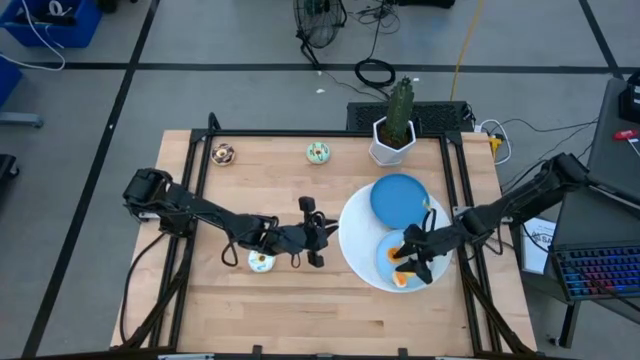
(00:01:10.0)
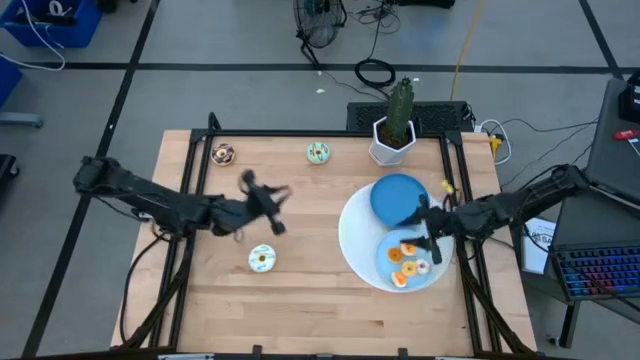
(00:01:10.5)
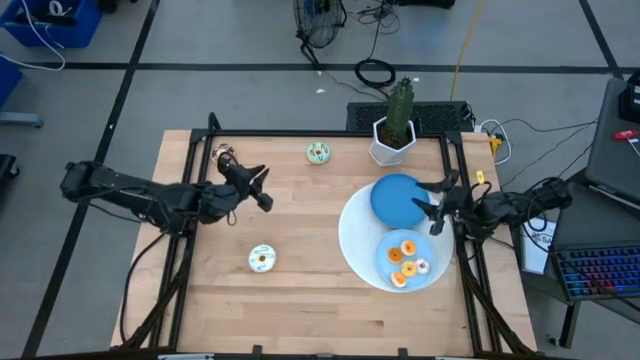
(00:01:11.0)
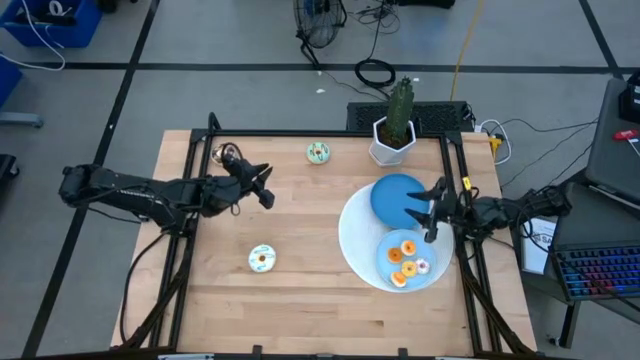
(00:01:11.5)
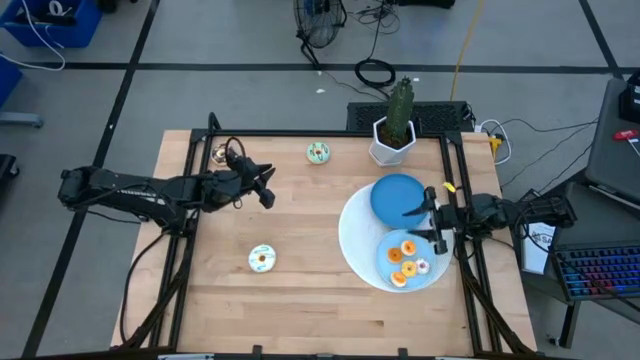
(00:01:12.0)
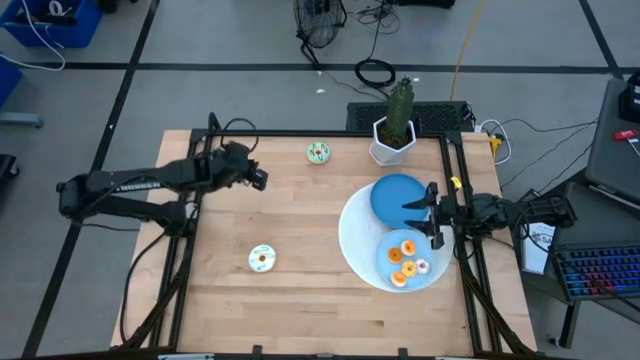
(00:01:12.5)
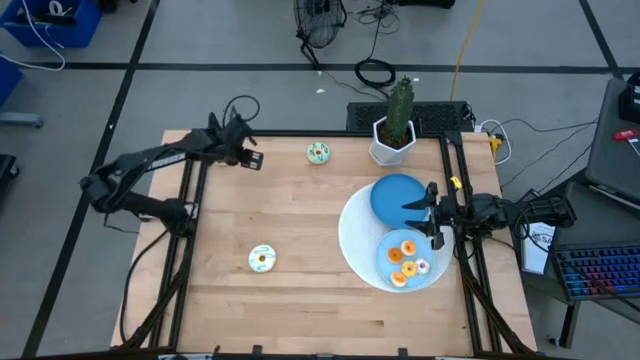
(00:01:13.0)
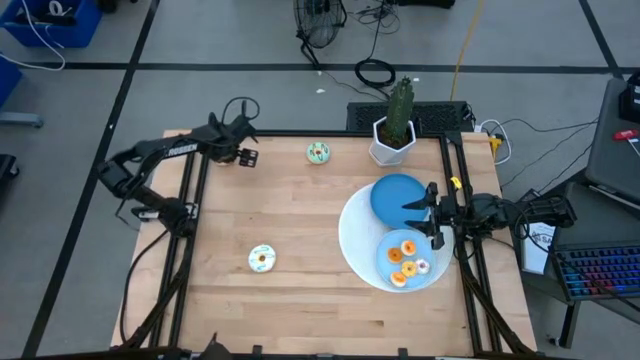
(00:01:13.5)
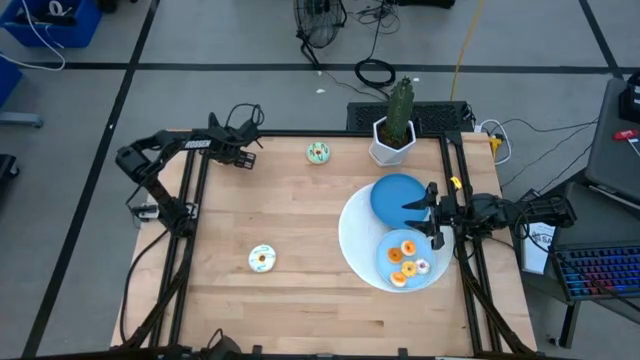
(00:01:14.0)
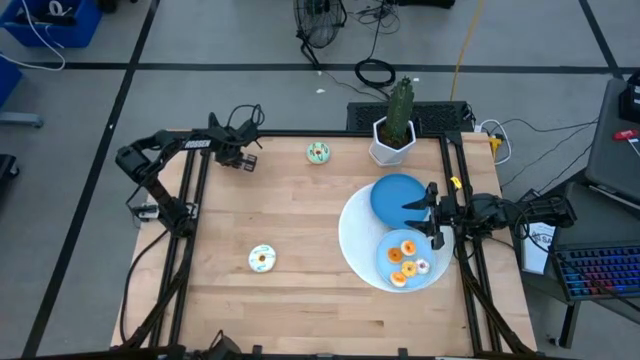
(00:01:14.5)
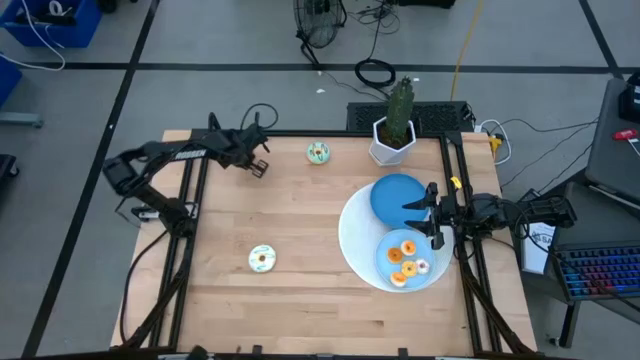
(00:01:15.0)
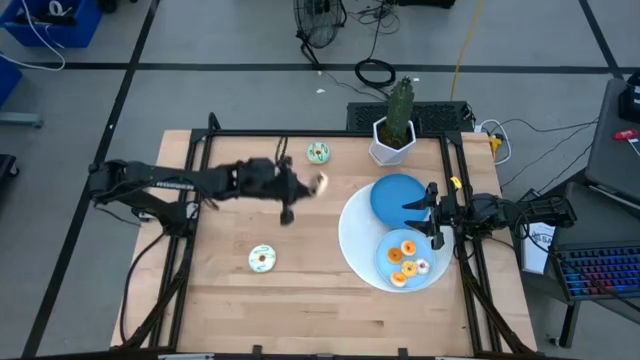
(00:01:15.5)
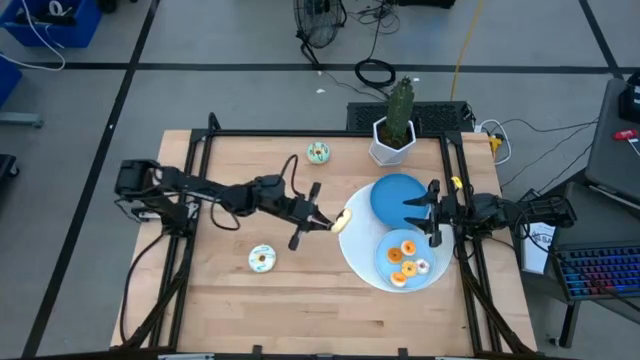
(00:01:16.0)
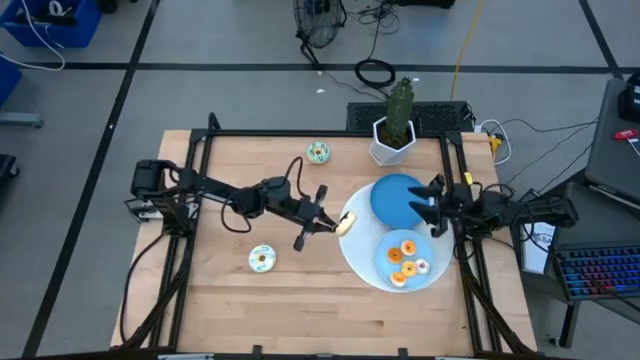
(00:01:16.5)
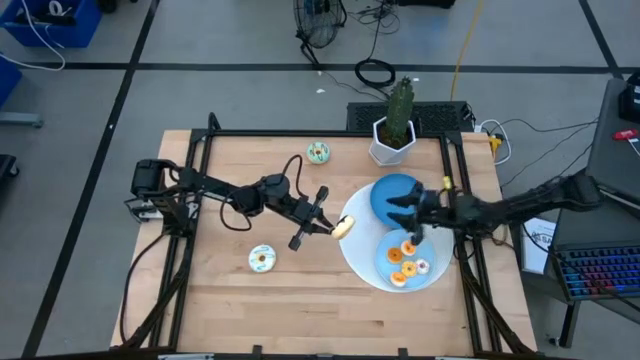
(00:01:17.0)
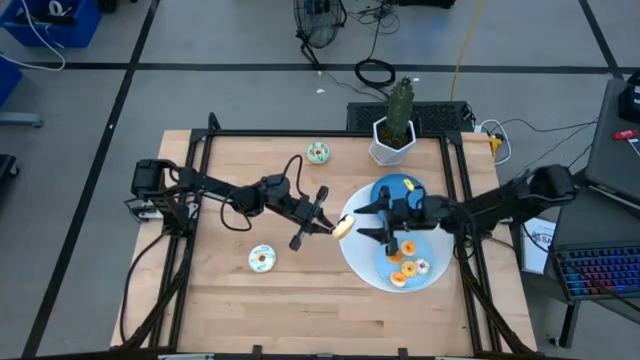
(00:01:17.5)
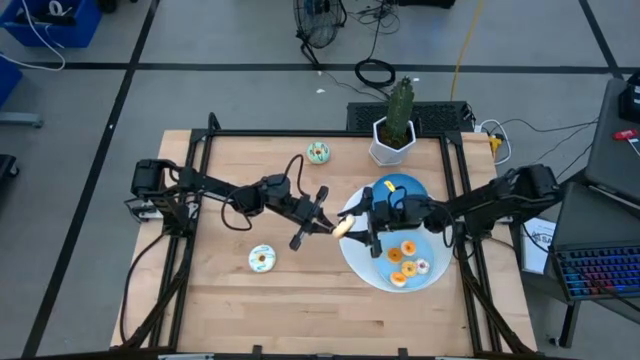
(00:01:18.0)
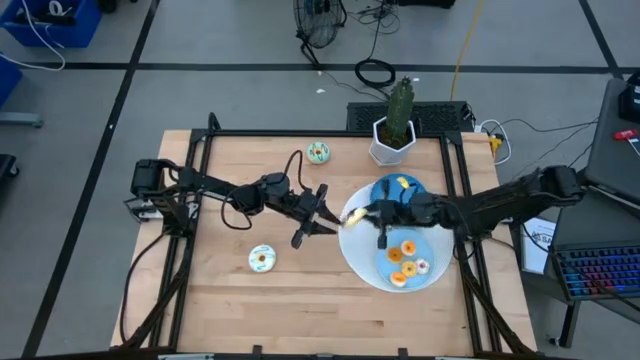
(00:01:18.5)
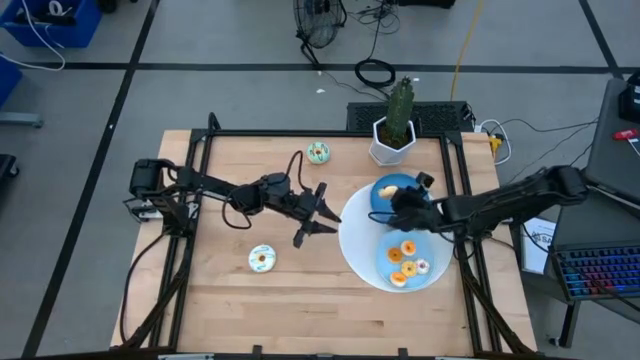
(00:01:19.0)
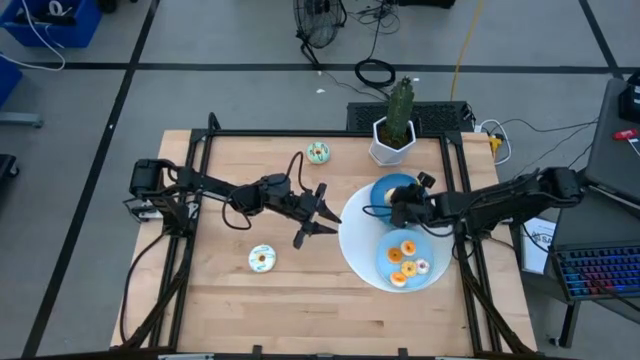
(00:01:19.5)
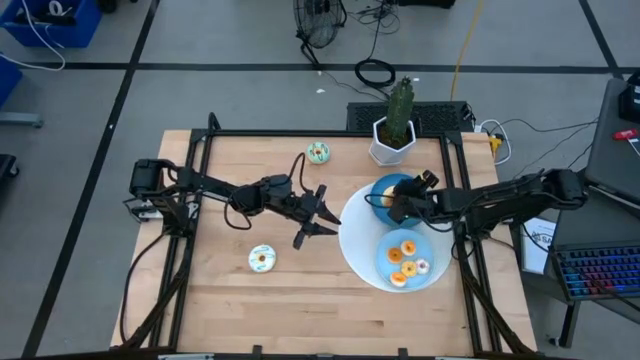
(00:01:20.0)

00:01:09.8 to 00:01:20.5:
Task: Pick & Place donuts
Put the big black donut on the blue plate

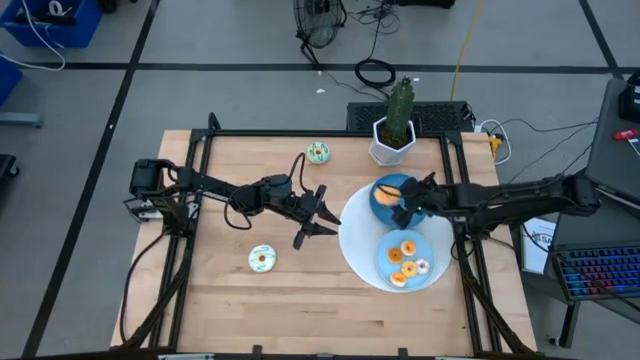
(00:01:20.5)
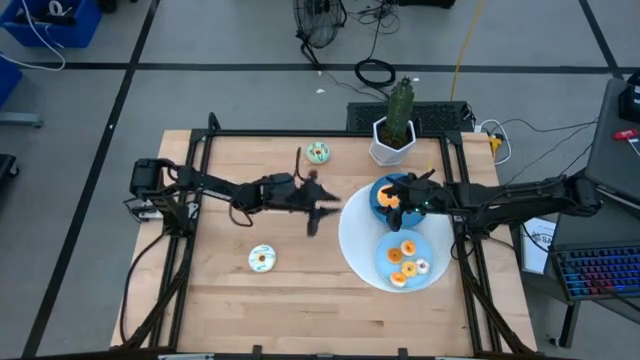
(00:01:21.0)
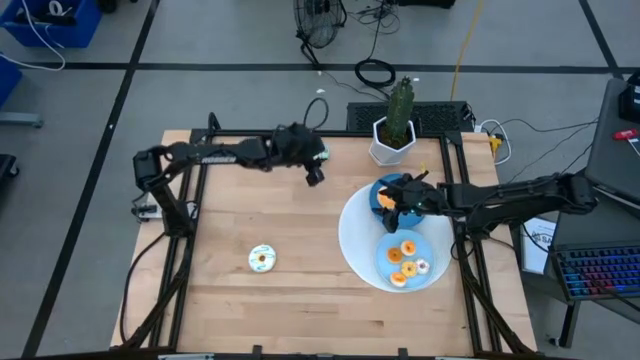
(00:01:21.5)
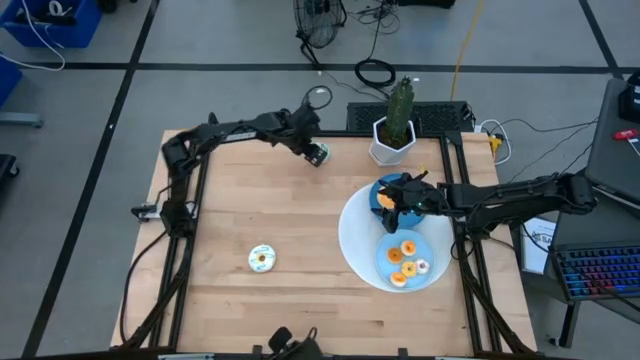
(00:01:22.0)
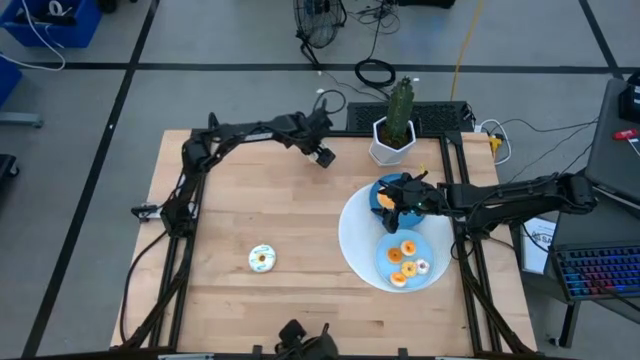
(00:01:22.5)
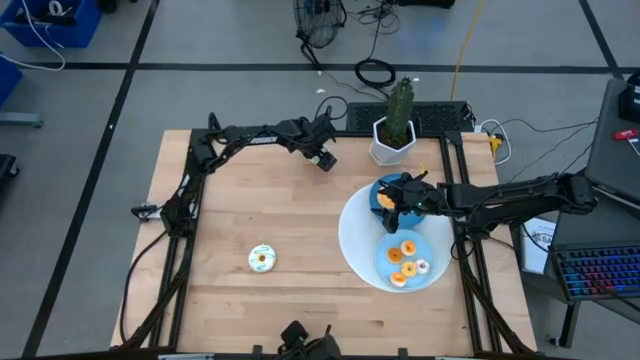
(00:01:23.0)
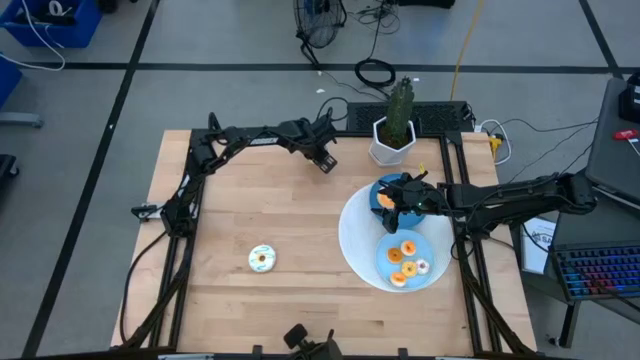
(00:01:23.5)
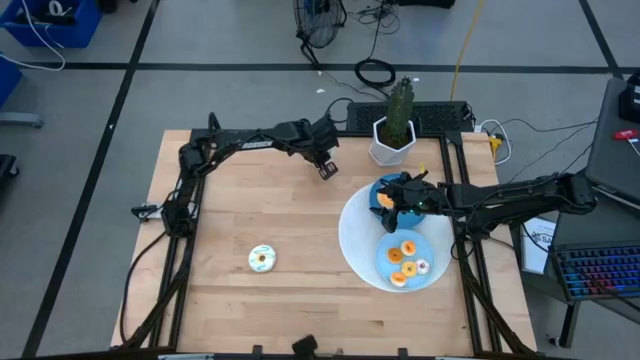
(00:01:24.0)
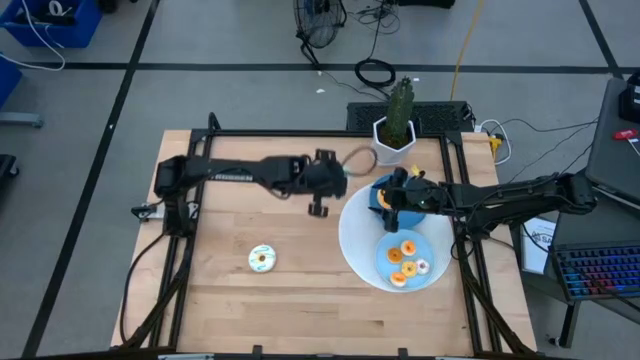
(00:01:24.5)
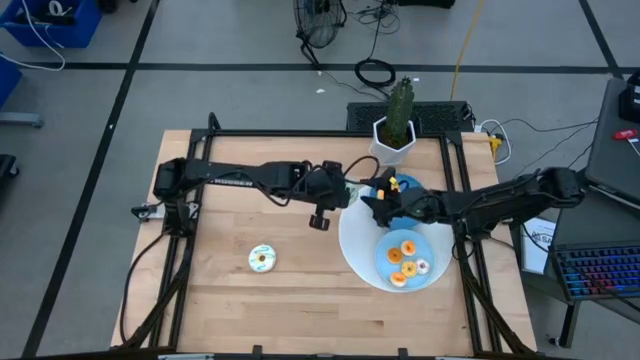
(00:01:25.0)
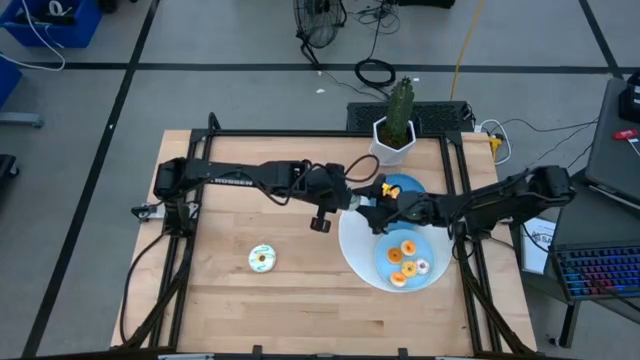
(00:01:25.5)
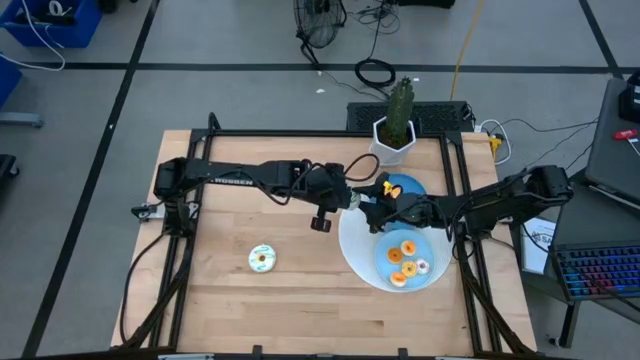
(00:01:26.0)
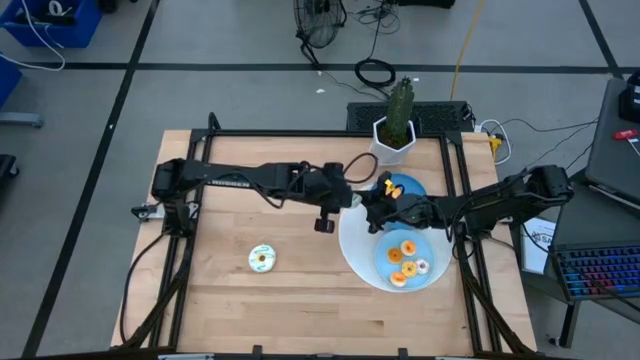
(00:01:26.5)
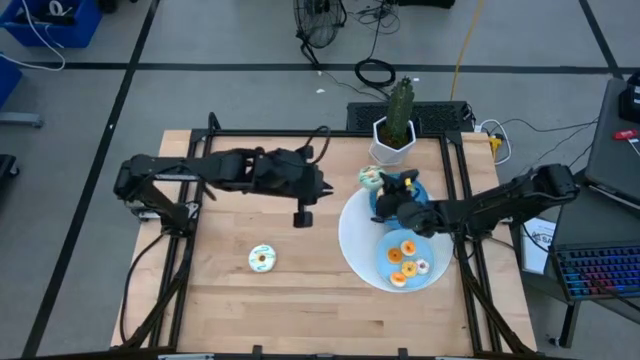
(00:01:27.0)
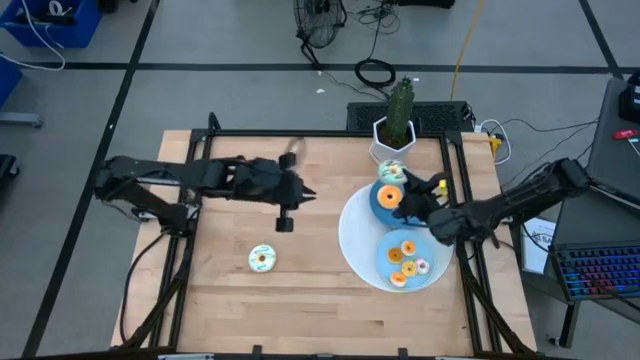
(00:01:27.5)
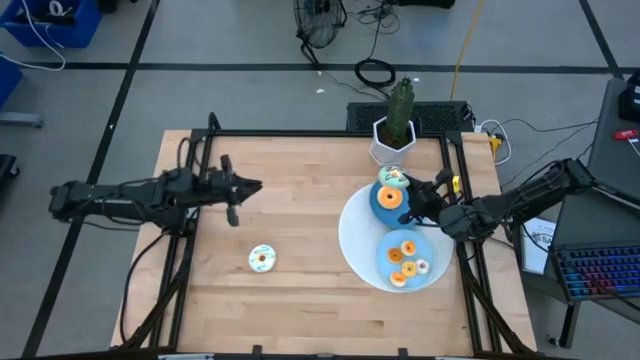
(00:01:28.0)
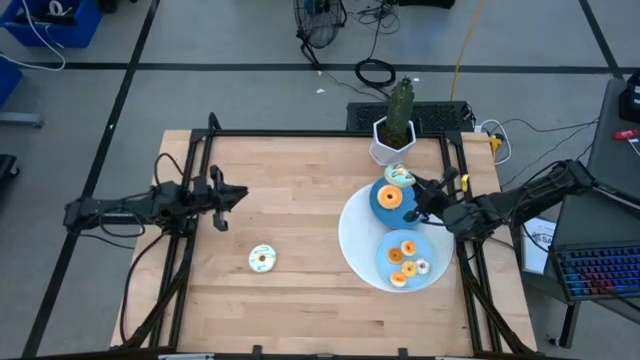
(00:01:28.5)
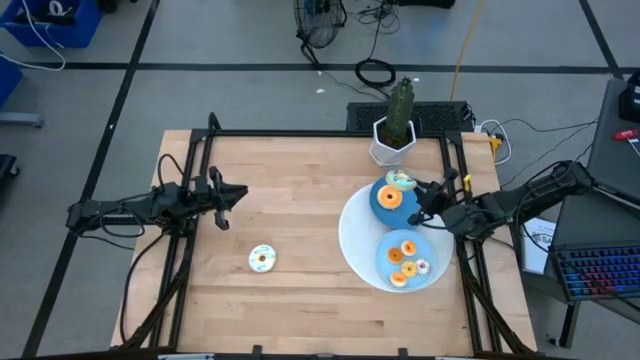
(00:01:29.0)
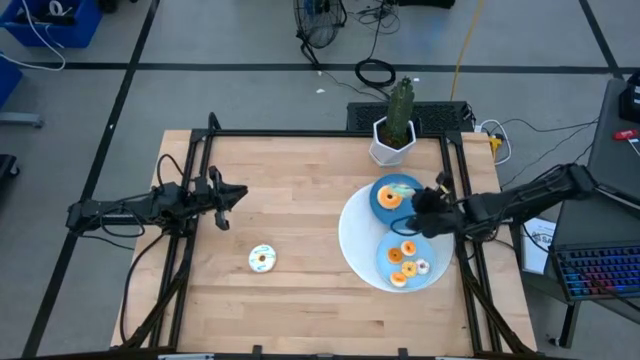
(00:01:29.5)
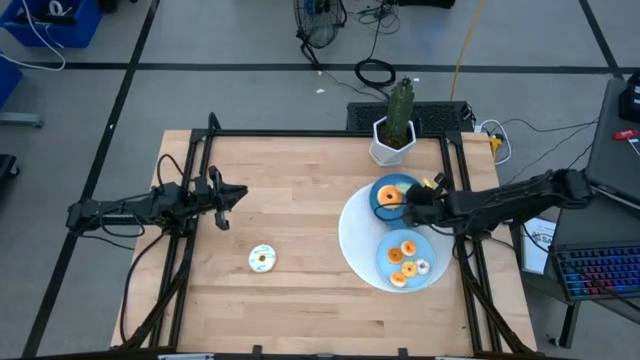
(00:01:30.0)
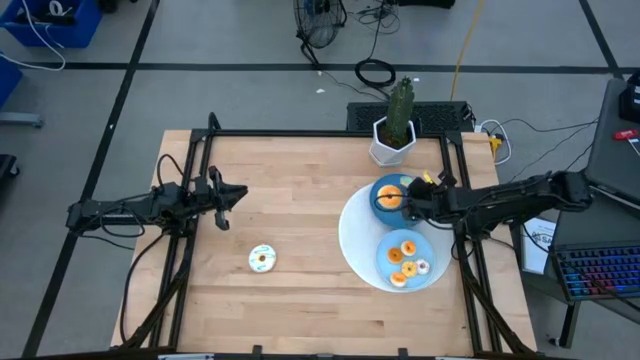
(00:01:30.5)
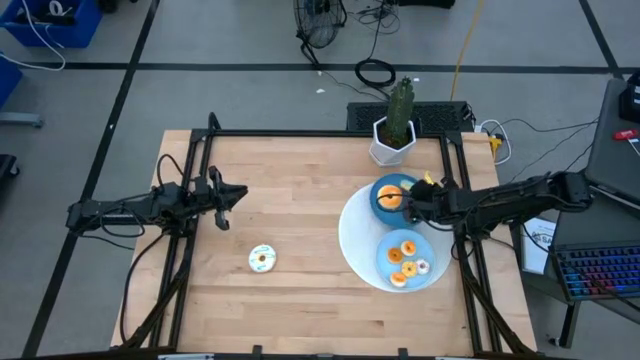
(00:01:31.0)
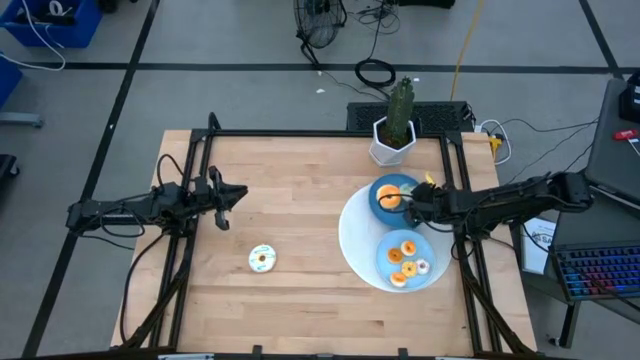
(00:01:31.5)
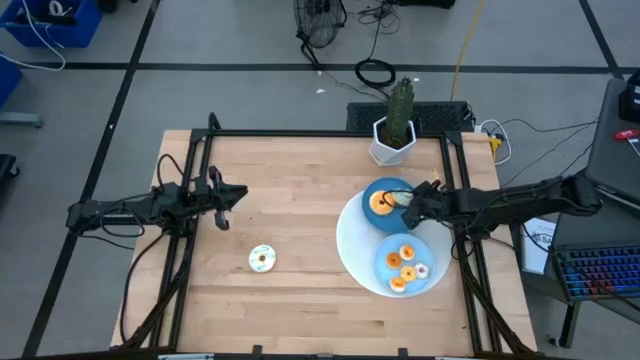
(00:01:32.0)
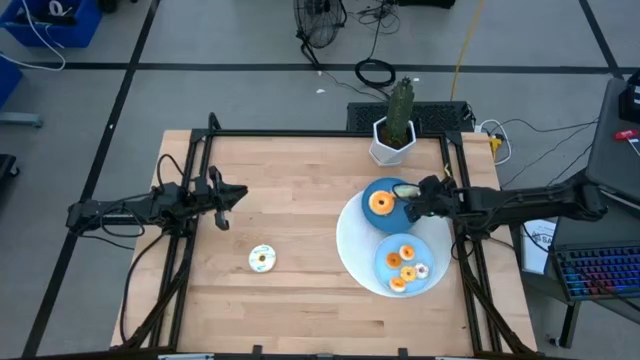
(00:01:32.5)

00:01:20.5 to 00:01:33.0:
Put the big light green donut on the blue plate
